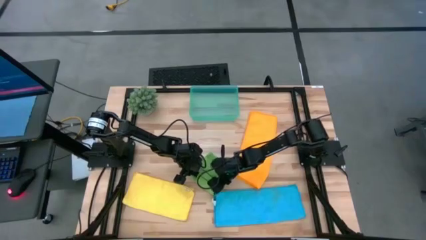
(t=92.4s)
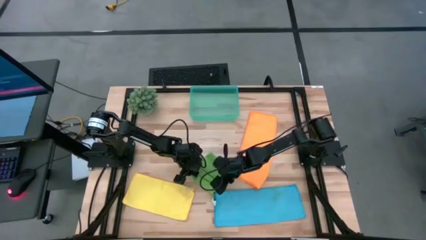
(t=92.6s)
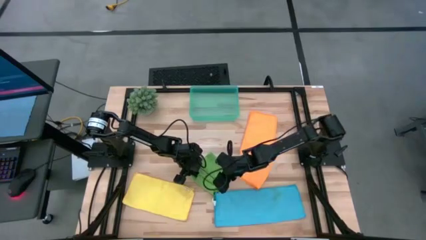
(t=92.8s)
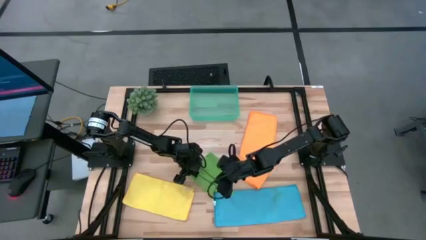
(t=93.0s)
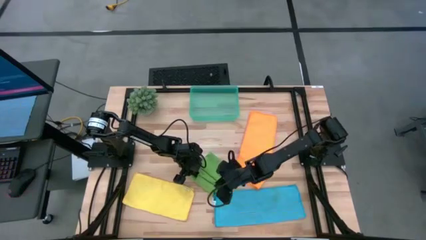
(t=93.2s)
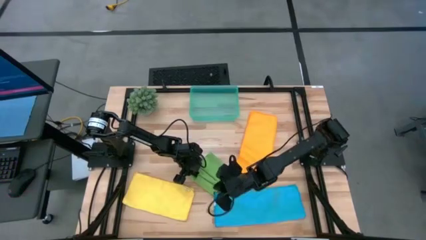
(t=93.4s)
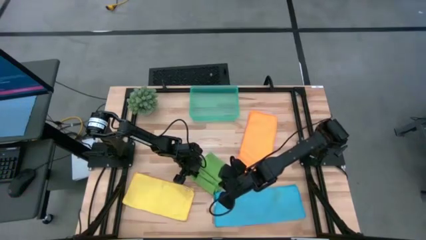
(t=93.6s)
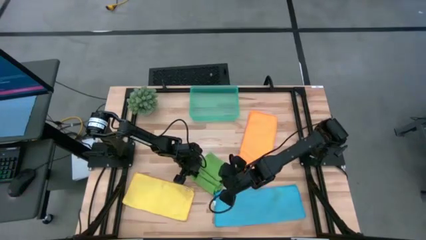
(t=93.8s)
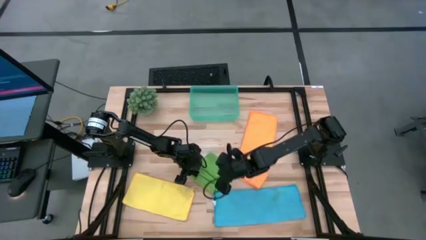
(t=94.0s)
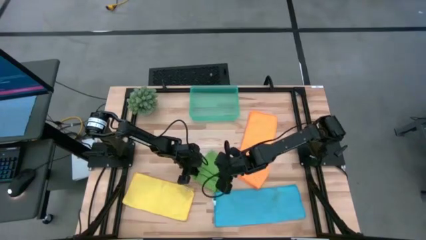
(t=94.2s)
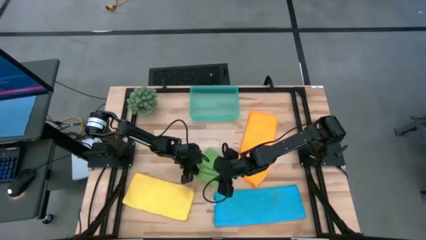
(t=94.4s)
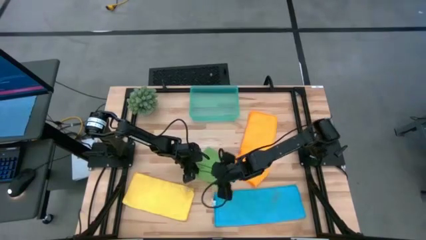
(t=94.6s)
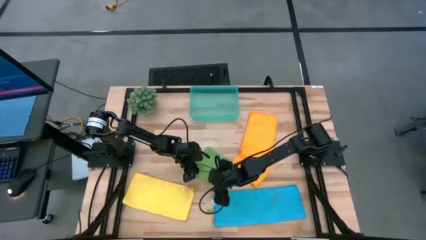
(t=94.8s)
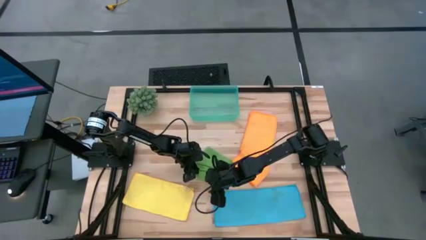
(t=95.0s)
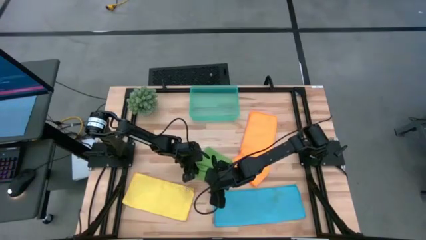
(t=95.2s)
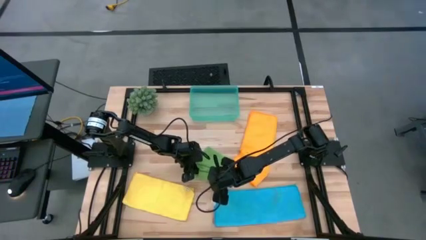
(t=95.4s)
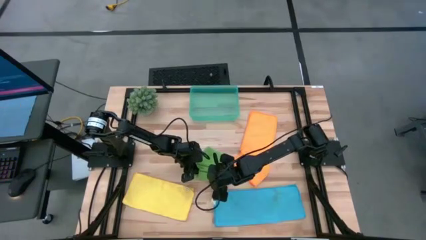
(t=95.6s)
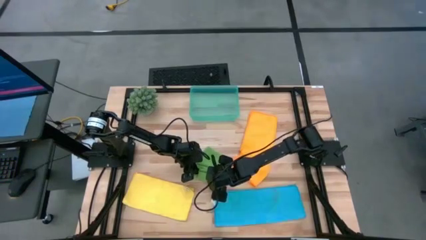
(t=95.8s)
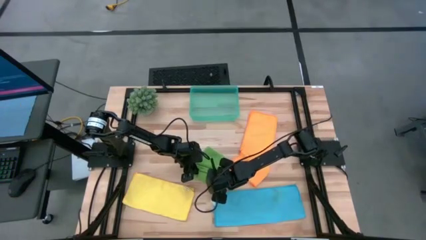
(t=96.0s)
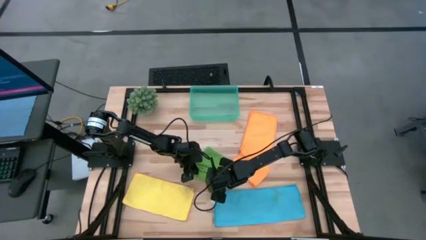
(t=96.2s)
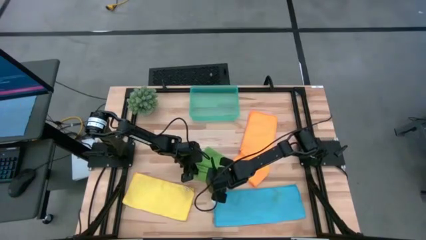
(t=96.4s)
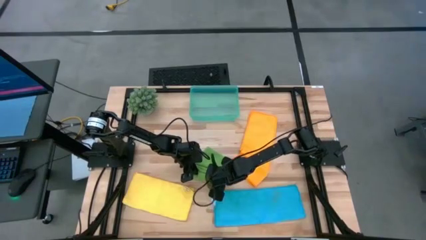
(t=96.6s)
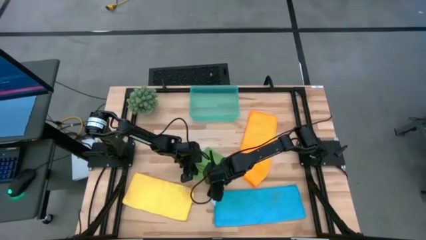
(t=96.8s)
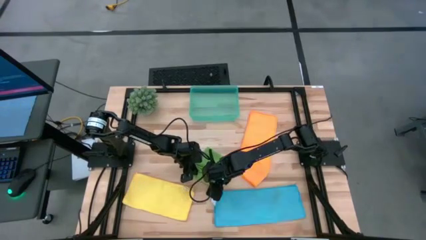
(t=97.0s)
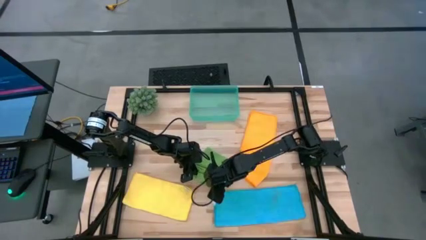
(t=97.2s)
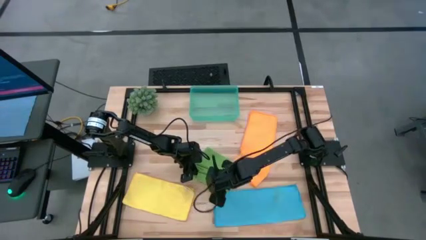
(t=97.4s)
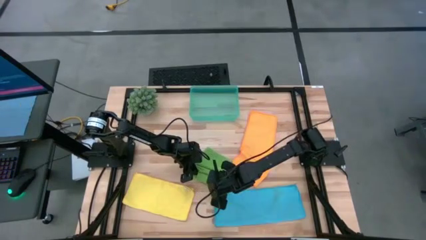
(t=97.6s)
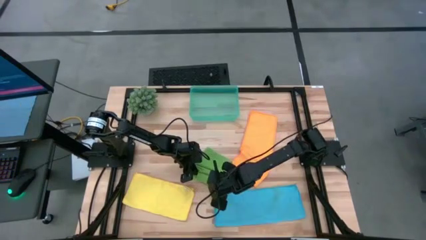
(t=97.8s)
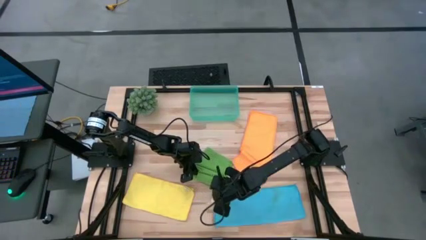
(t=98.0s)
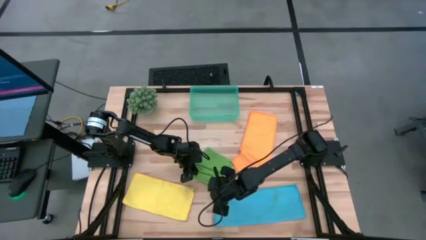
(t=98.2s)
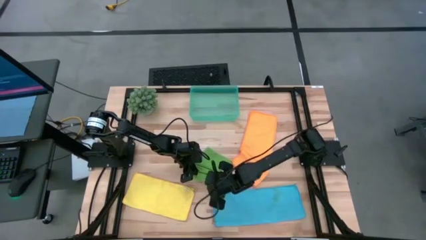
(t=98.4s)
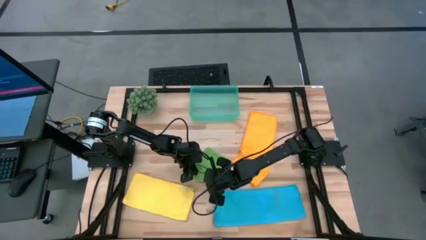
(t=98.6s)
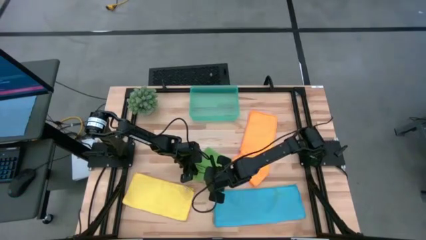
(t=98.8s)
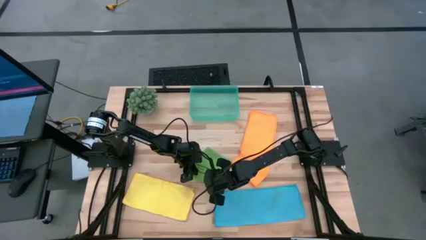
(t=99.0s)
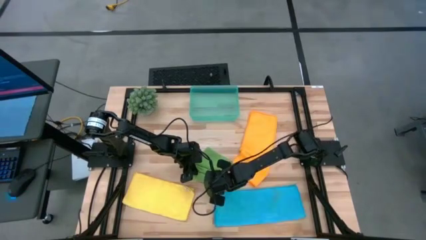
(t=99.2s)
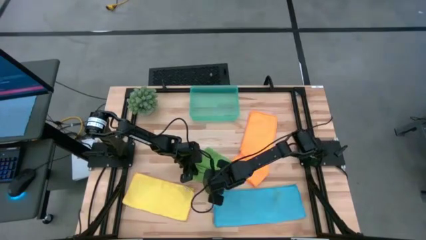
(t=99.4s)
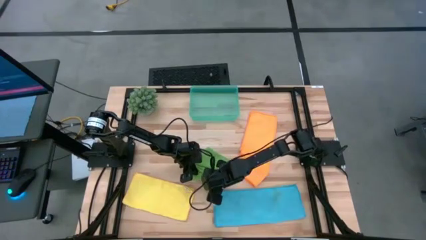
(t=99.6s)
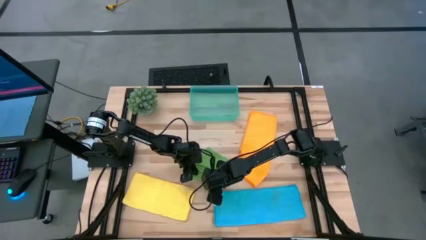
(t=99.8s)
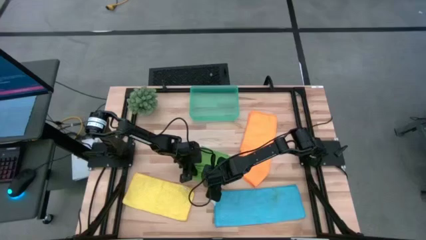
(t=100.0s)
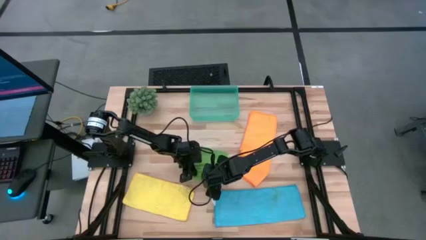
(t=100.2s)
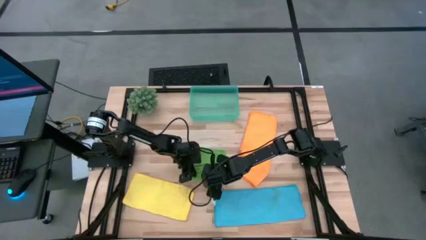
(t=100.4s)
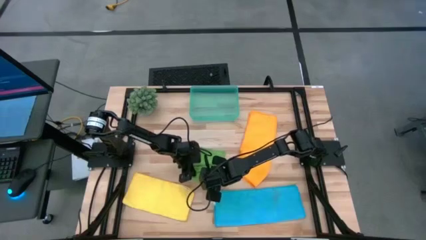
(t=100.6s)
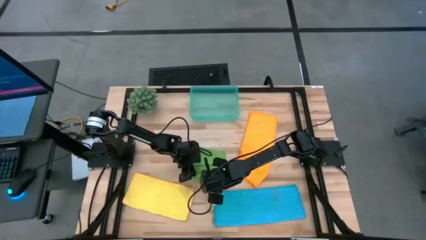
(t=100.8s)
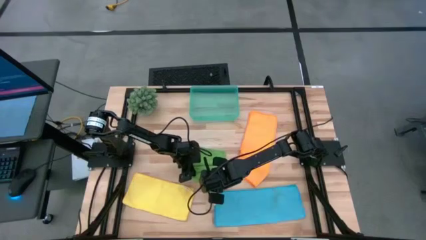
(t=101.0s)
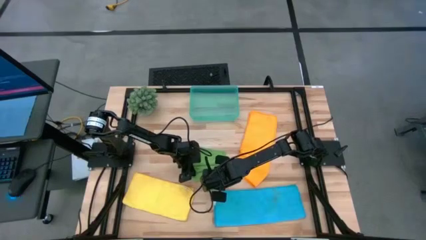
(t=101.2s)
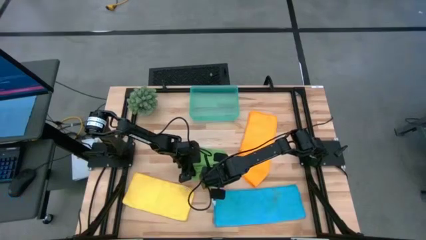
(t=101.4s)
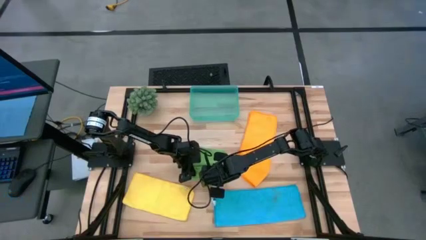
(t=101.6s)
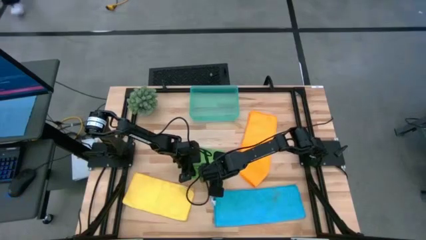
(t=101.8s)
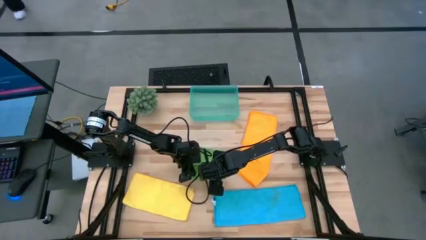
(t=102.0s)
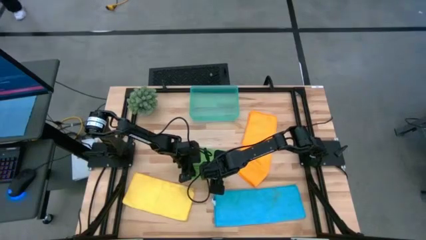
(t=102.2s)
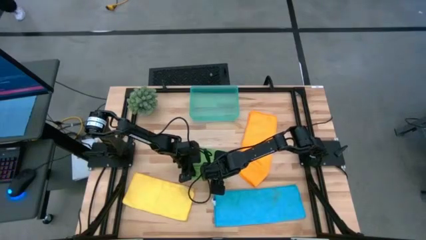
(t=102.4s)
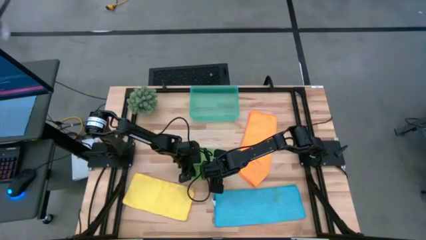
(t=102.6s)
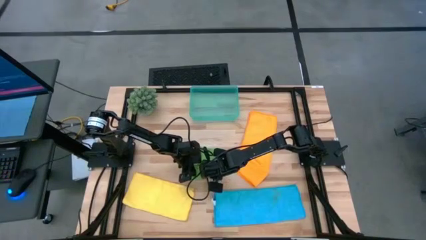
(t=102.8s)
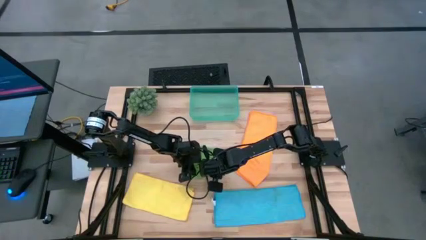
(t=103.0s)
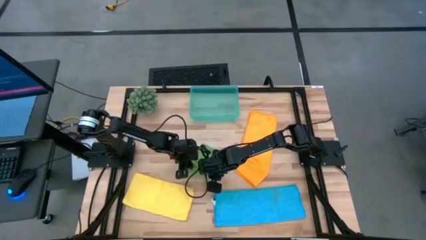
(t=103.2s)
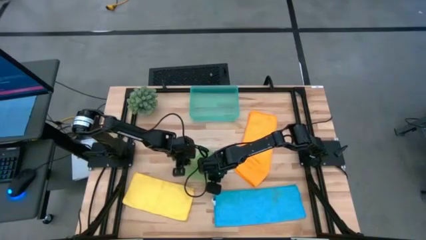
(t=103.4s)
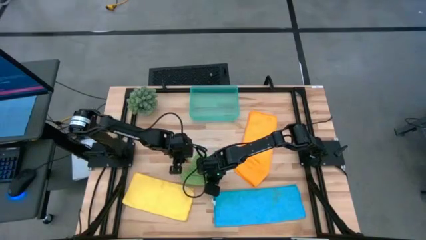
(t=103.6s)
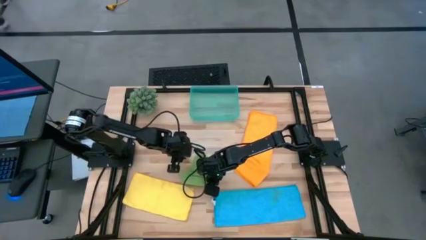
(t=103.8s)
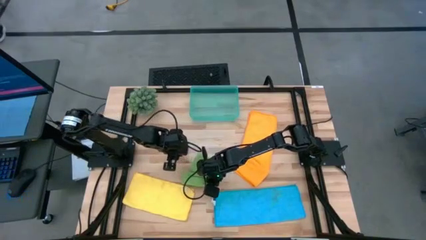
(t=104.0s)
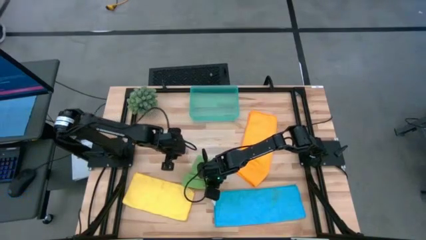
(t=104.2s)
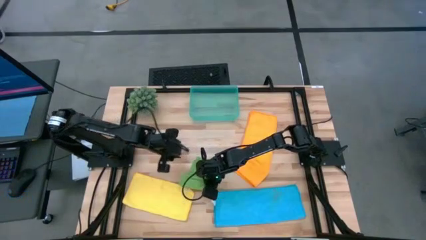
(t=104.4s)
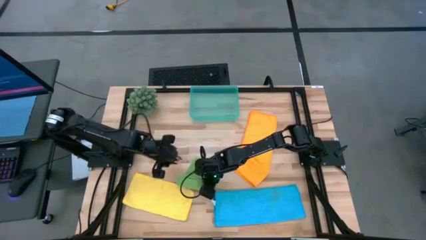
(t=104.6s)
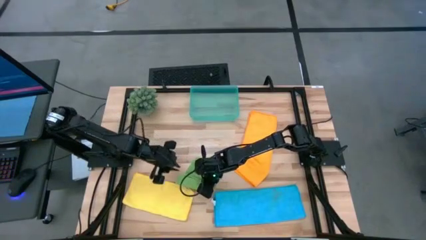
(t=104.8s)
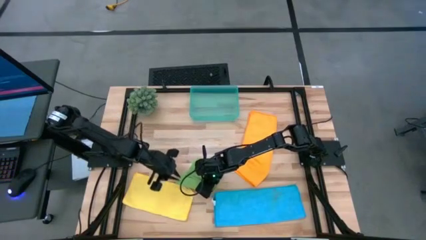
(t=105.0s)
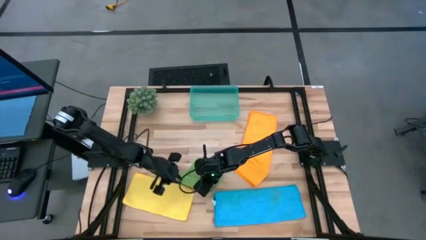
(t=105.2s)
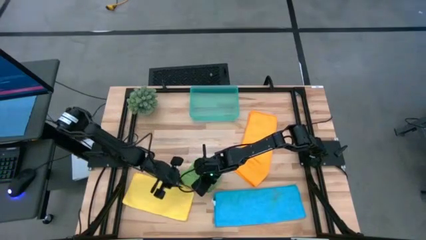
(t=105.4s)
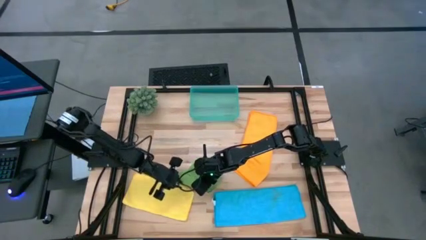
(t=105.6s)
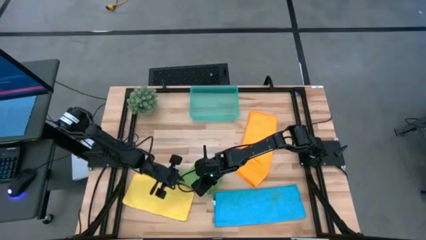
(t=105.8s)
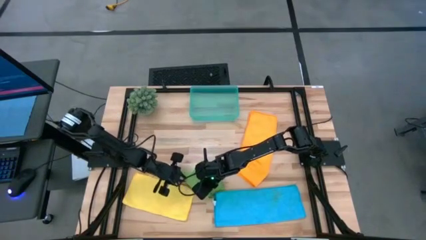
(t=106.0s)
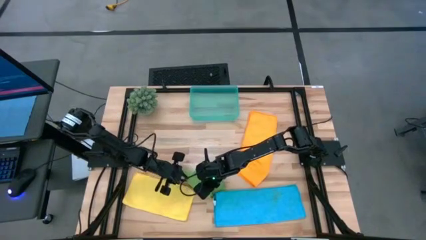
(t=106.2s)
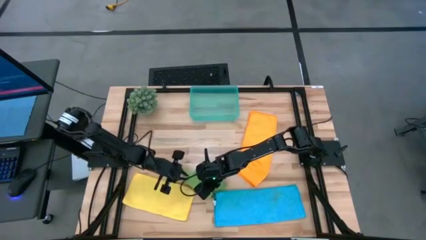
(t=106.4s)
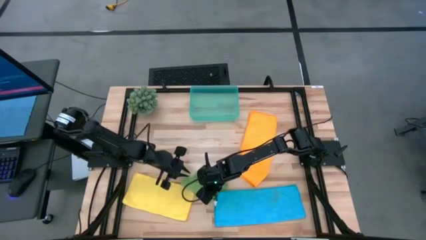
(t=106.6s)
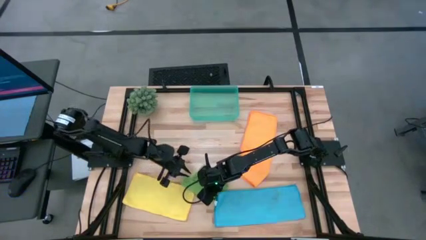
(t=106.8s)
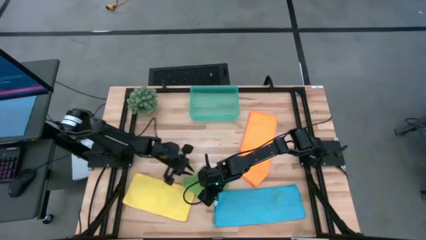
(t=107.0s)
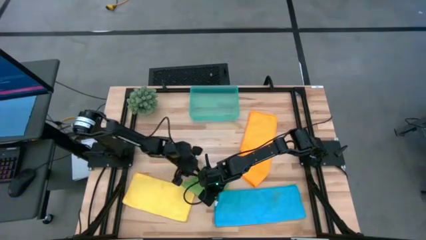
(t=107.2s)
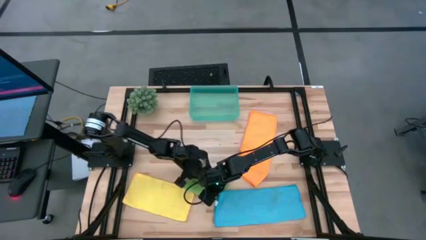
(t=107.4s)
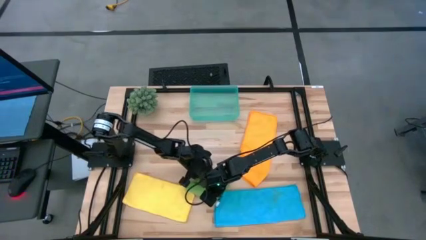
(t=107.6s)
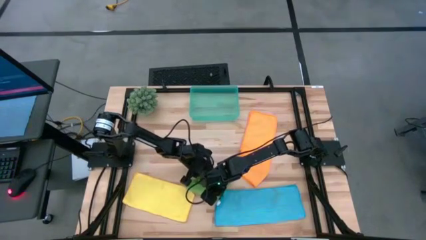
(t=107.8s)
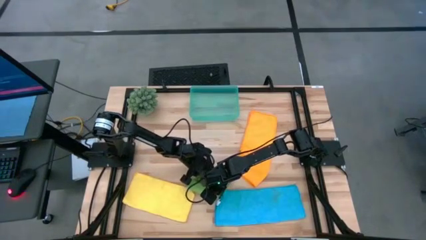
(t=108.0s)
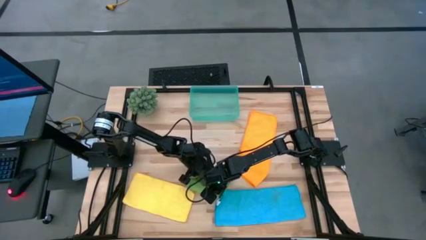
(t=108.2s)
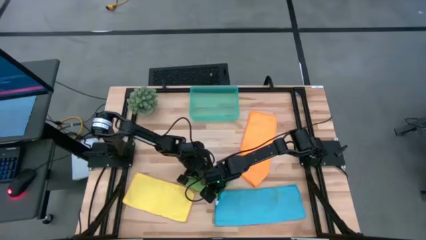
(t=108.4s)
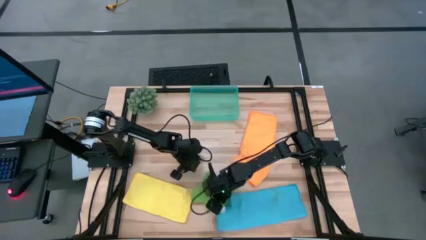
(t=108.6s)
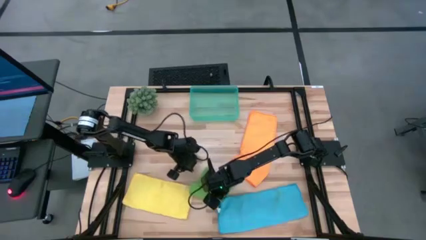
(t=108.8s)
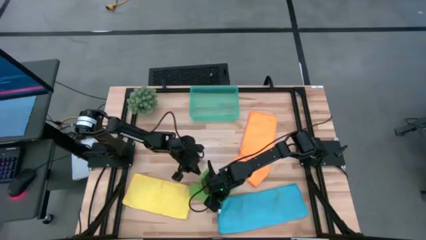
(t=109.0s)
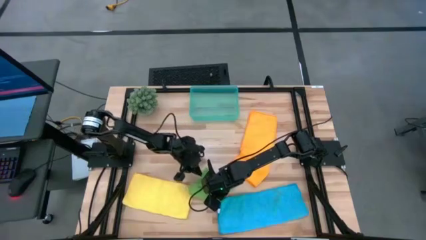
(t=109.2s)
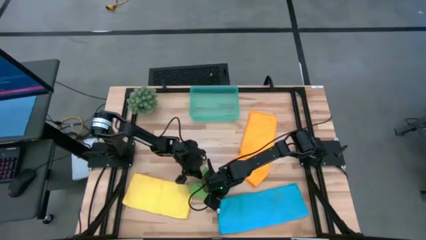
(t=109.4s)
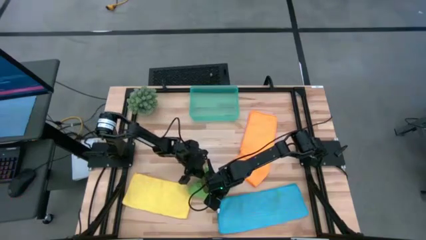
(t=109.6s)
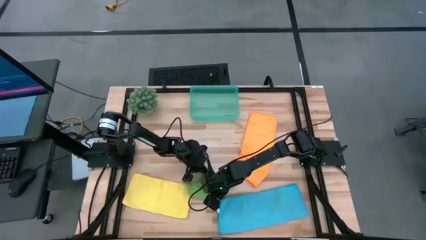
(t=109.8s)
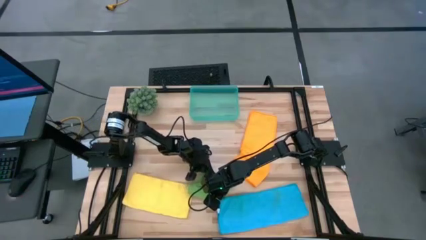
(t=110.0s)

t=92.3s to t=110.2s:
Task: Roll microfiber towels into tight, uniform cylinder then place into a basket
Roll the green towel
